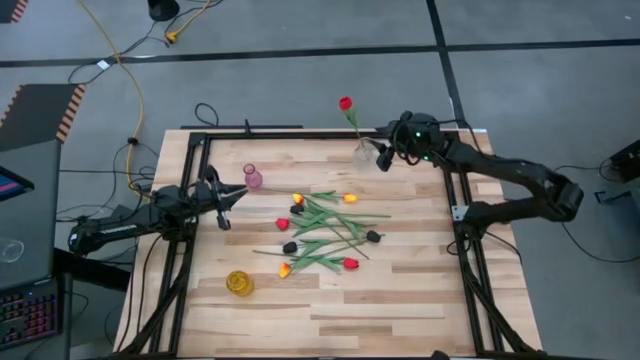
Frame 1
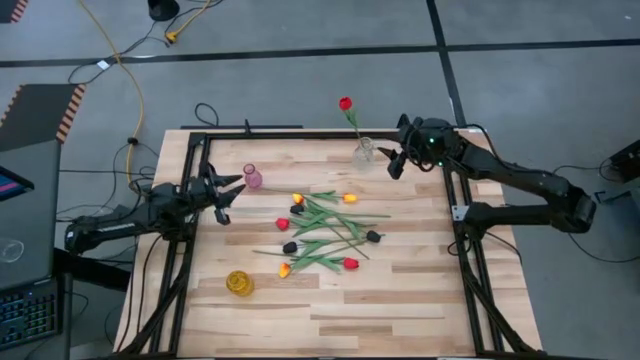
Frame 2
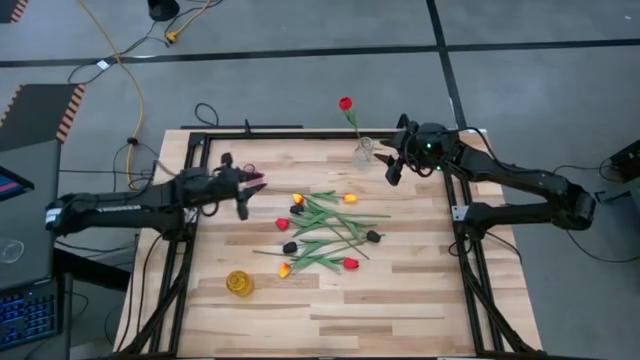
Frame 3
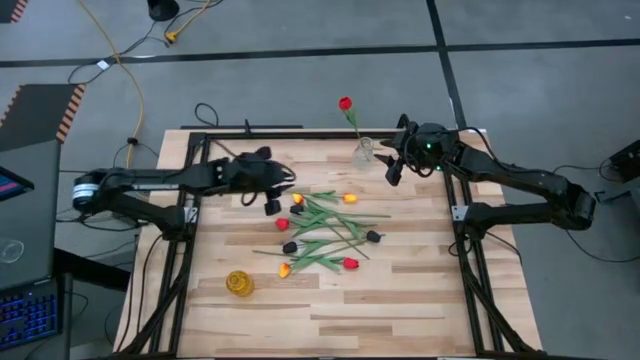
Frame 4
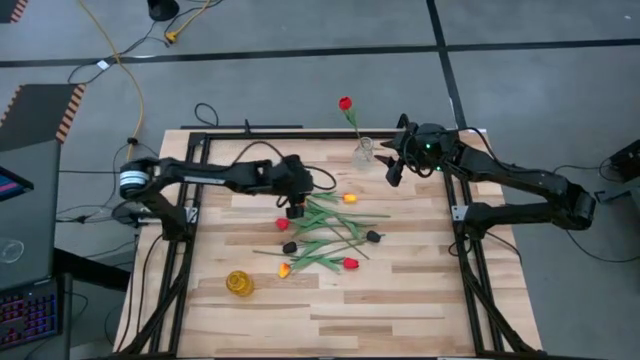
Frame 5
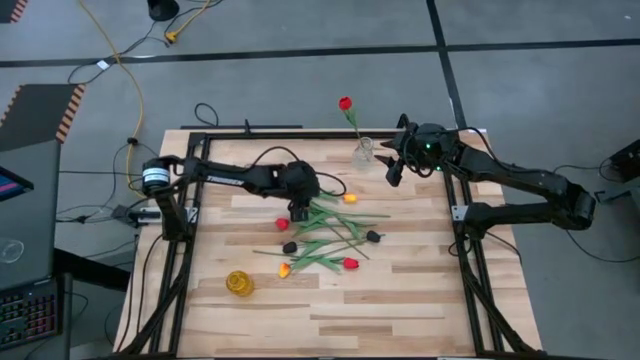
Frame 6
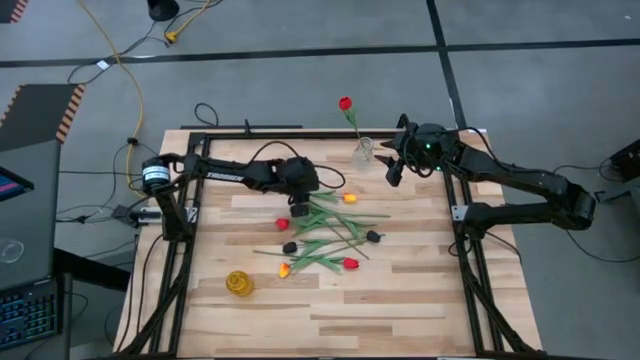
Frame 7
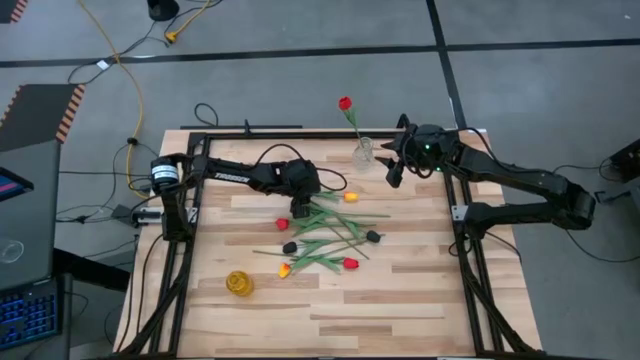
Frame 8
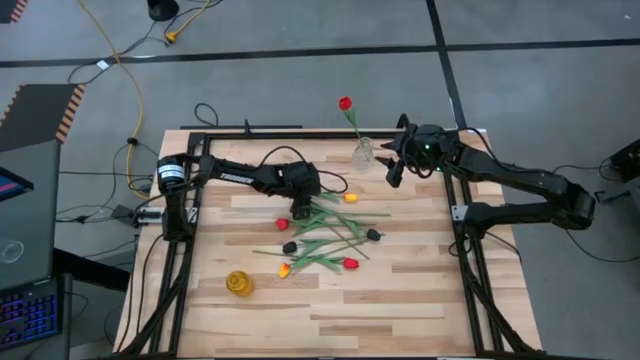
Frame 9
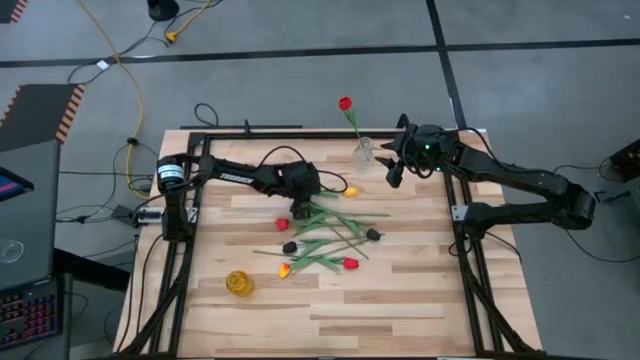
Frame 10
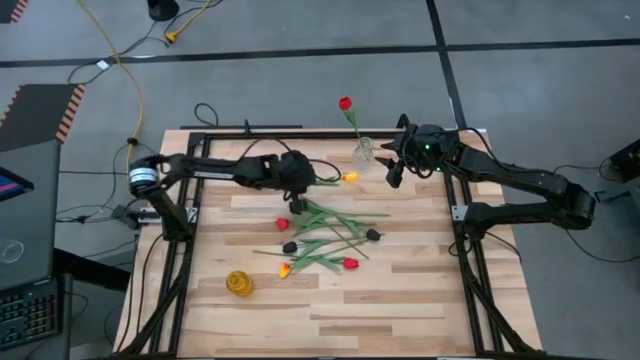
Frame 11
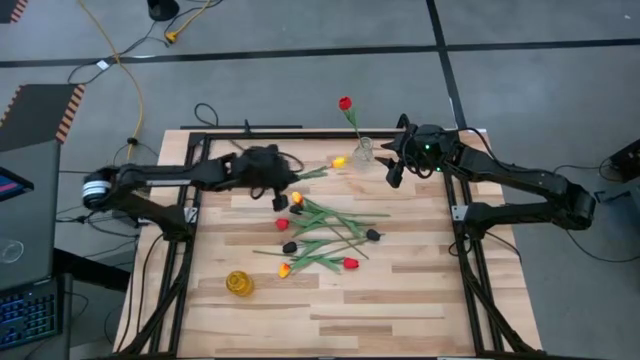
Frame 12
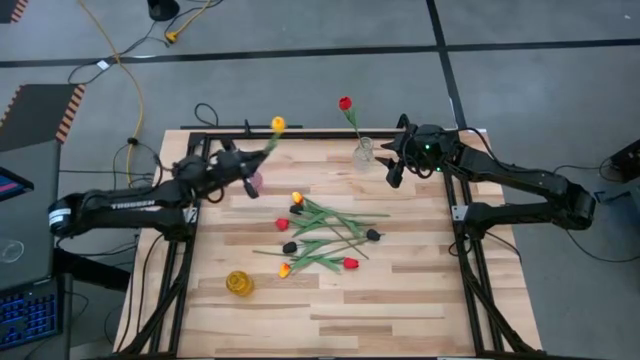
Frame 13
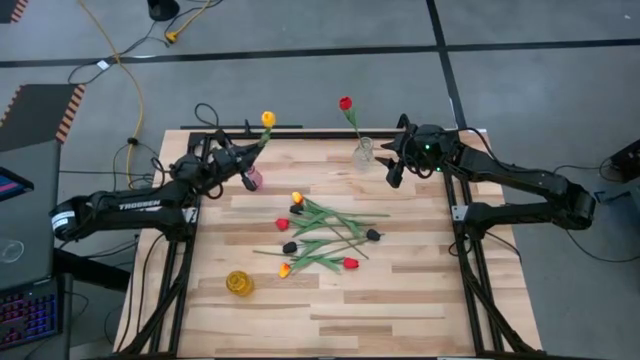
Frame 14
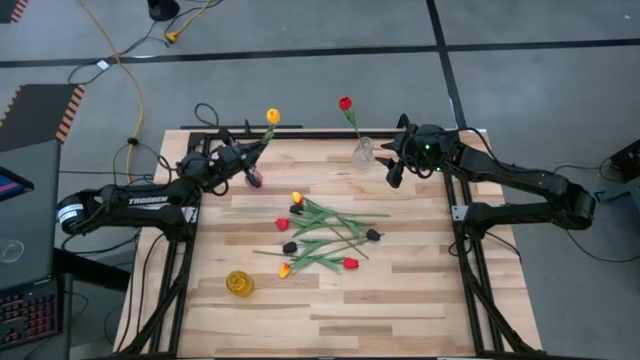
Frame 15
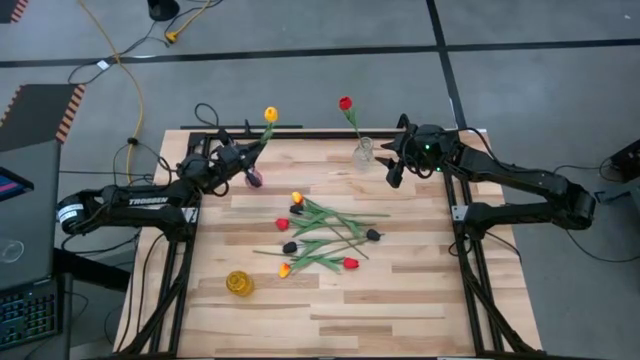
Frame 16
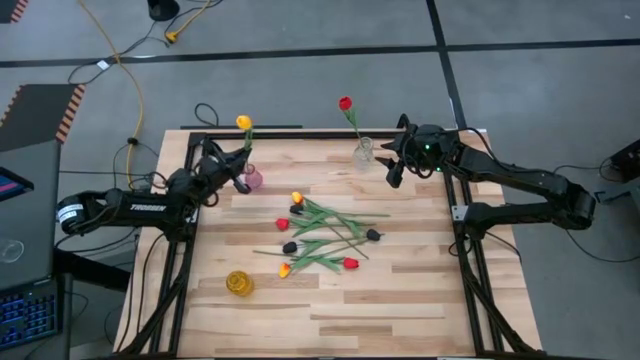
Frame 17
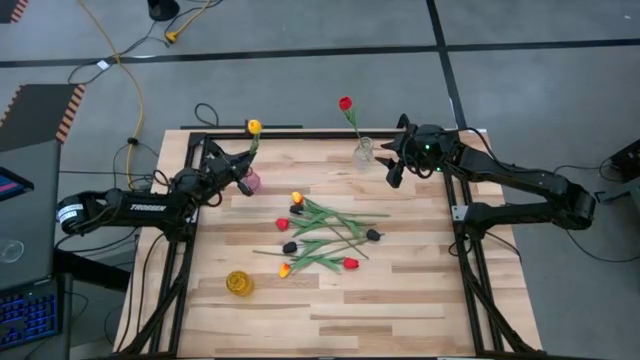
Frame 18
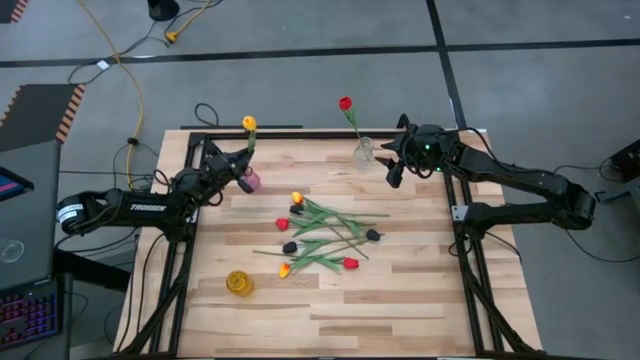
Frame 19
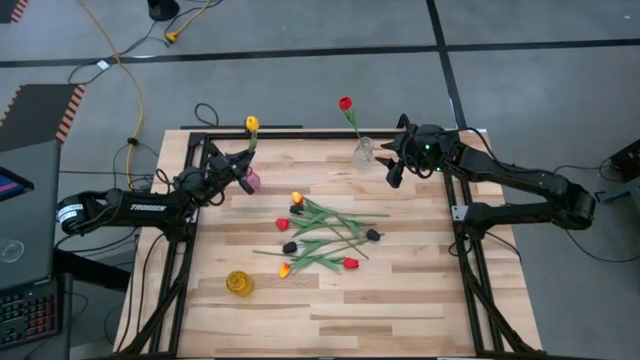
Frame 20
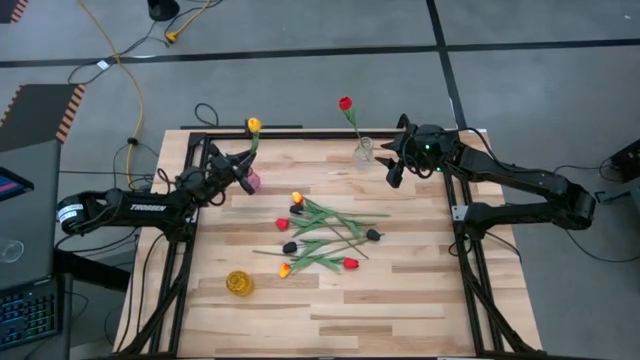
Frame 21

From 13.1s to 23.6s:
Task: Sort flowers into vase by color
Put the top right yellow tulip into the purple vase

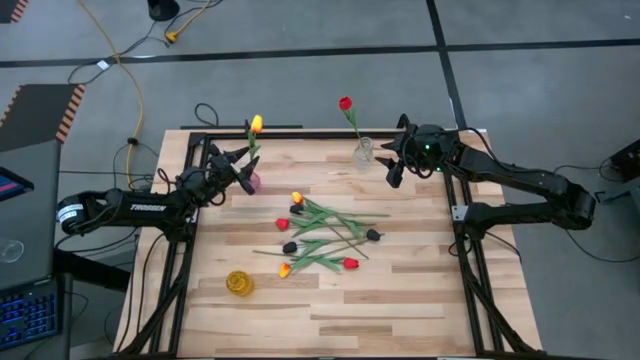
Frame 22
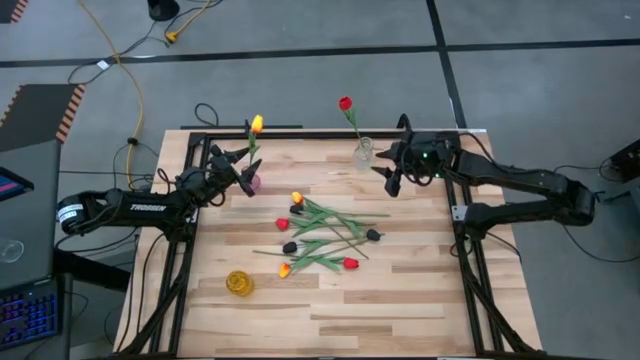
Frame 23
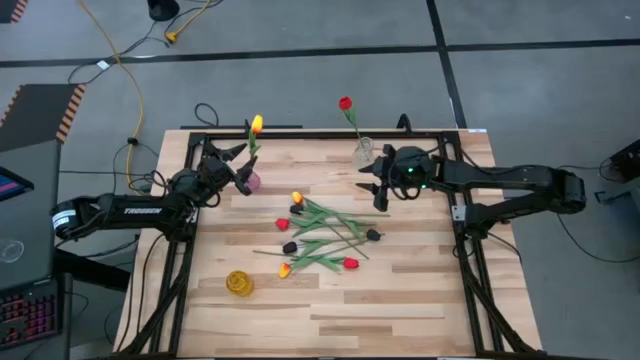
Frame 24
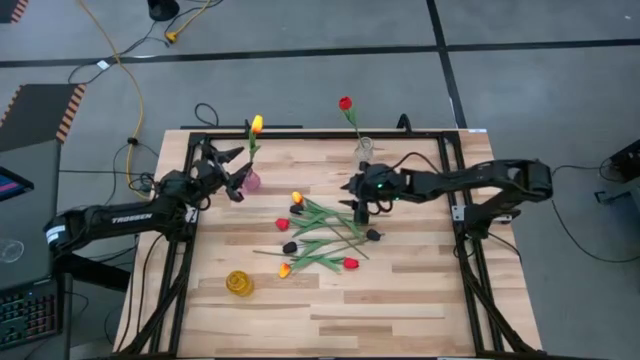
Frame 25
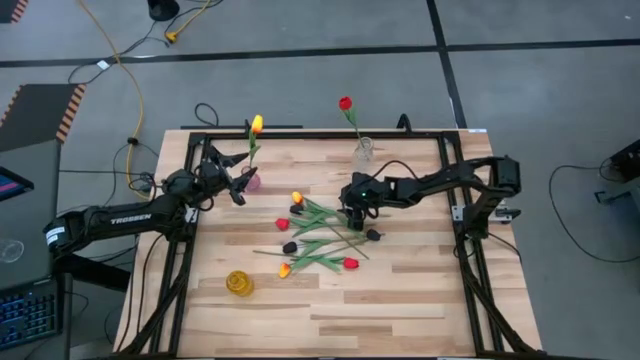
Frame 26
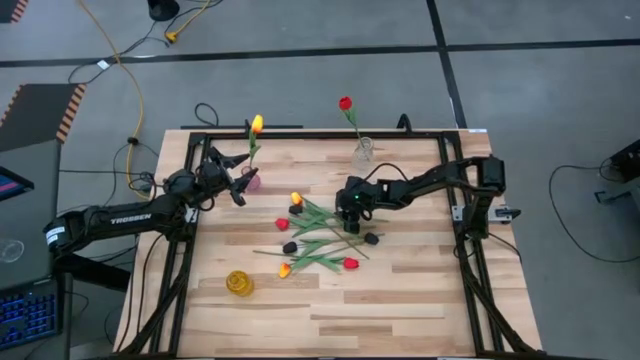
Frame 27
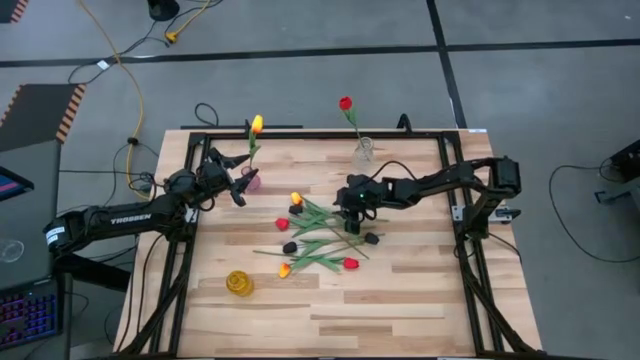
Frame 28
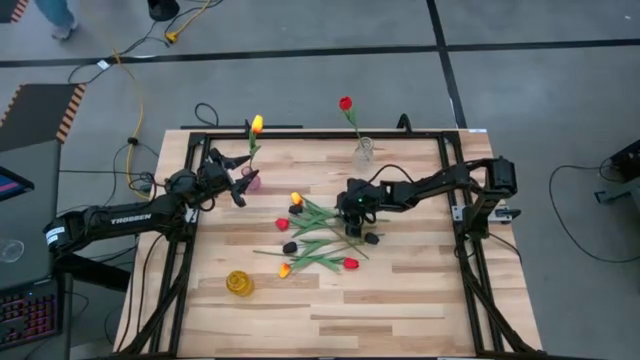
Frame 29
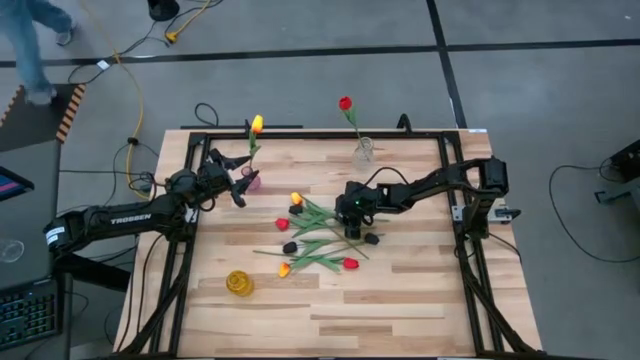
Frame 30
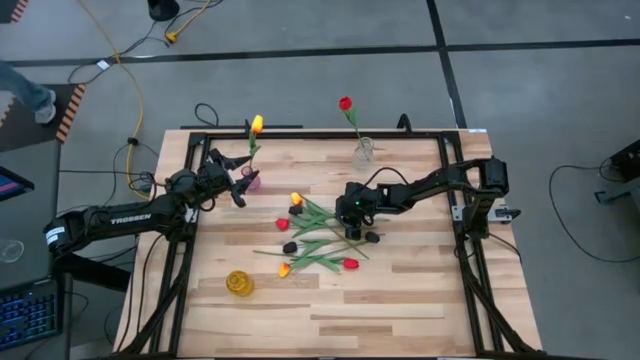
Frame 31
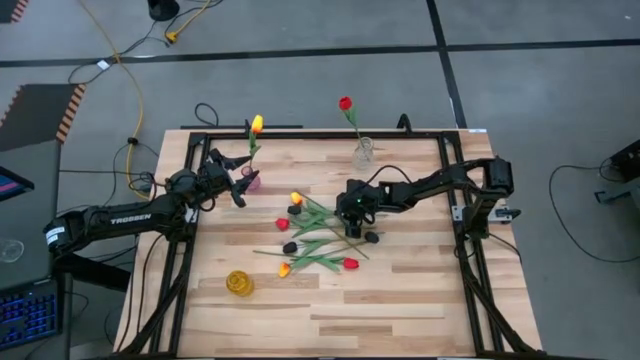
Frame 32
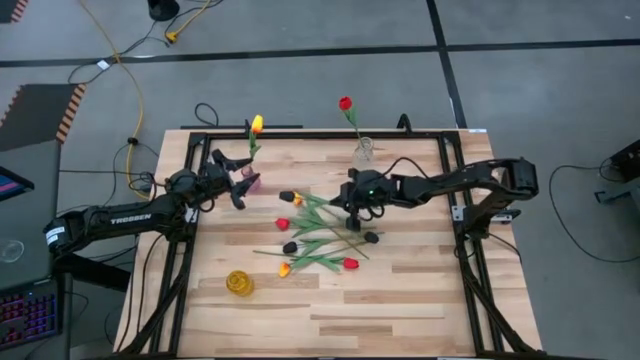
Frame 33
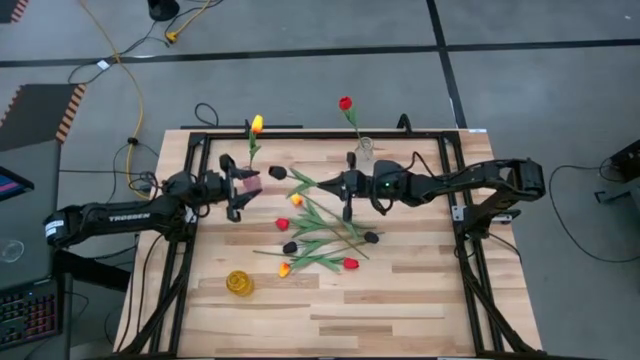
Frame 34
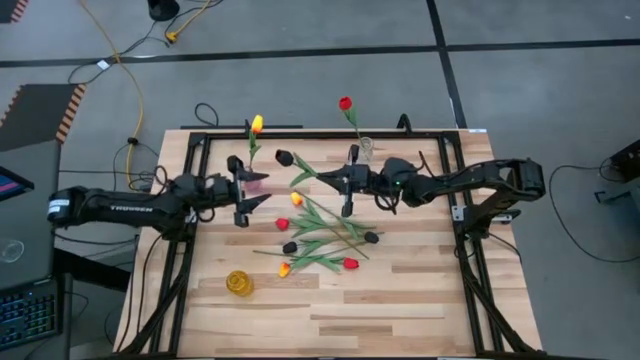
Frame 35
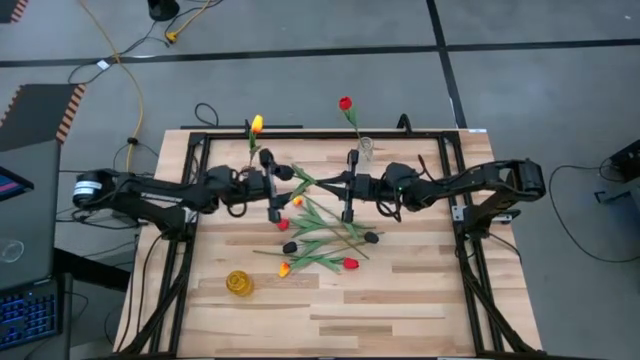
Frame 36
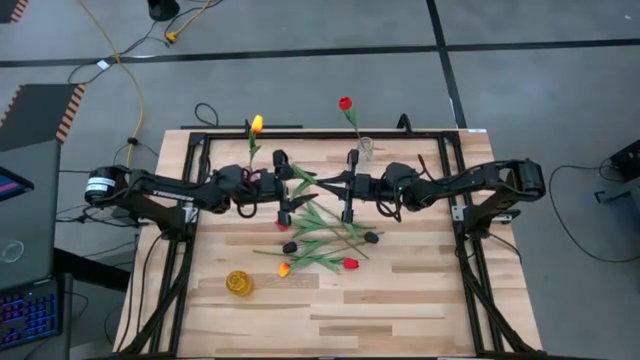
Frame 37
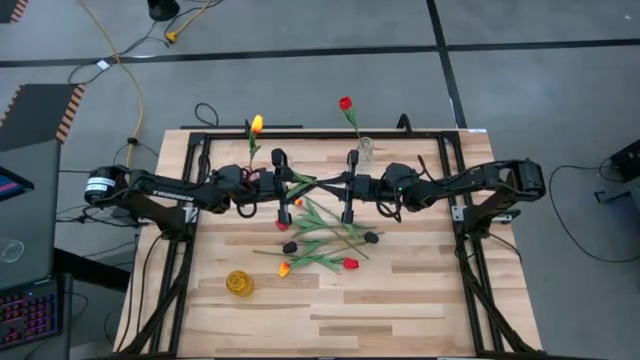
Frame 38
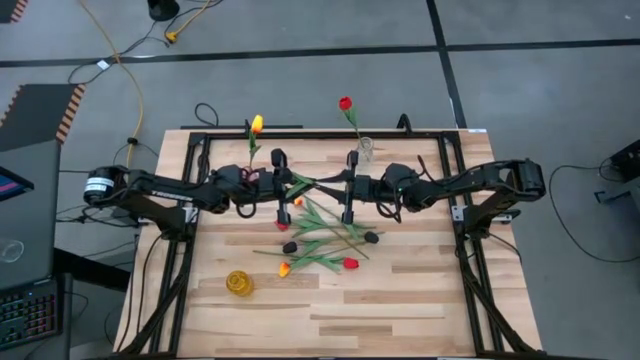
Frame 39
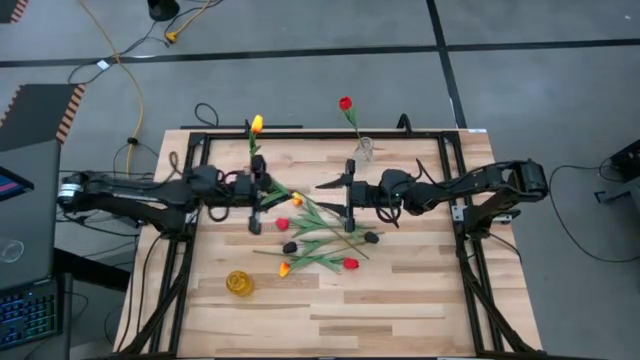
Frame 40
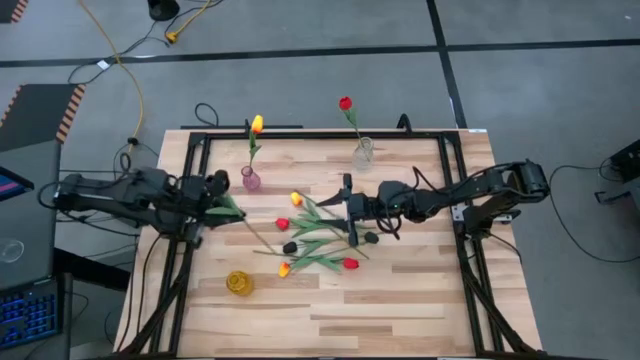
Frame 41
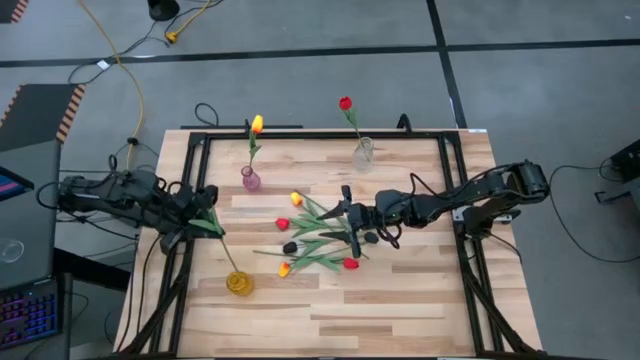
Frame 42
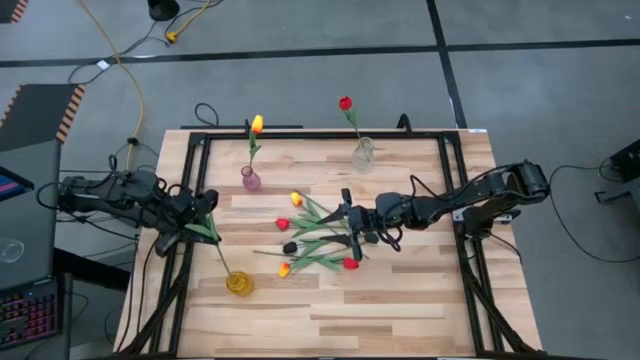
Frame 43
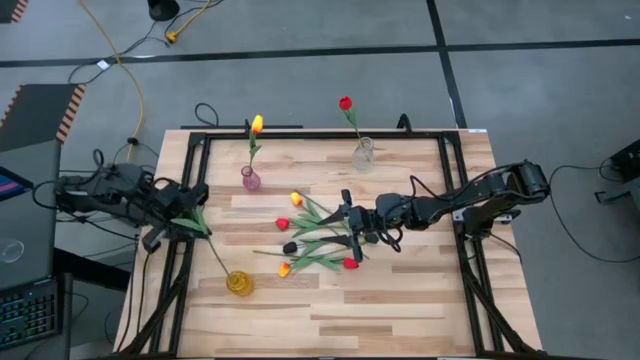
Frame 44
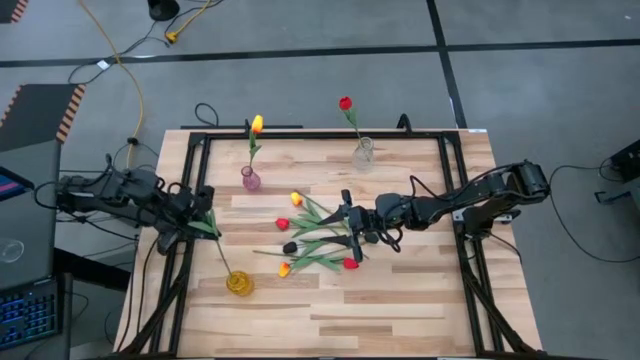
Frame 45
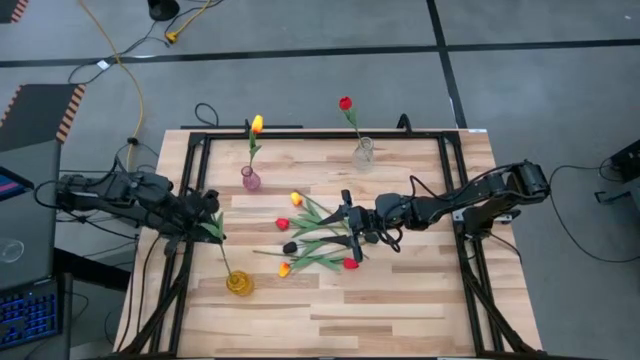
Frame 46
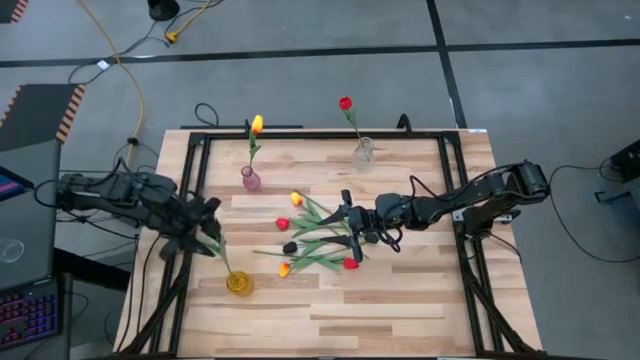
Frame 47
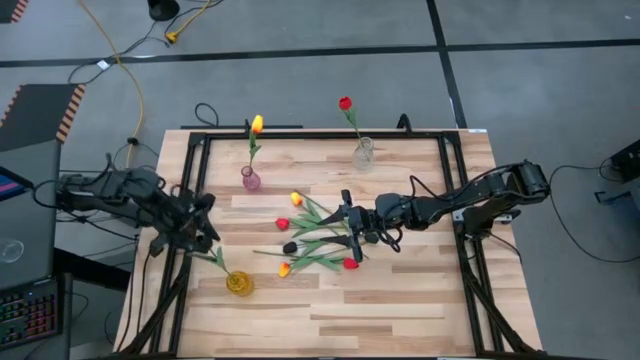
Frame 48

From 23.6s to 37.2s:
Put the top black tulip into the yellow vase
